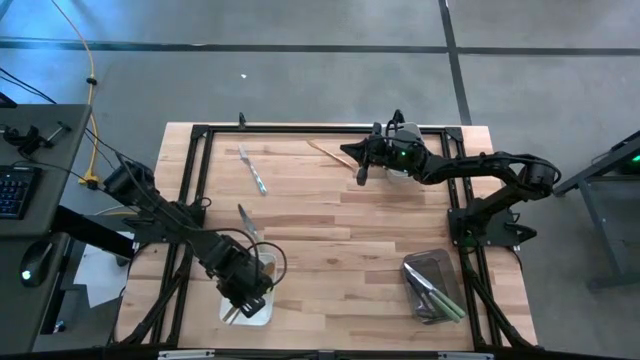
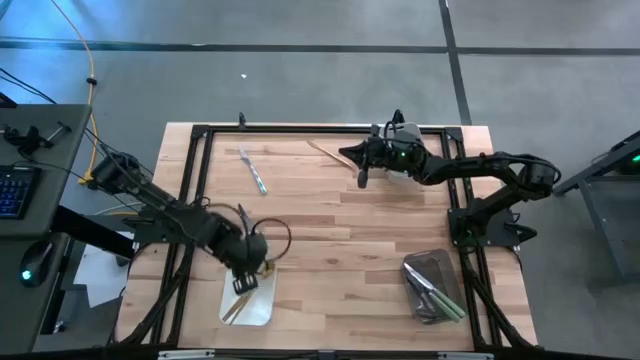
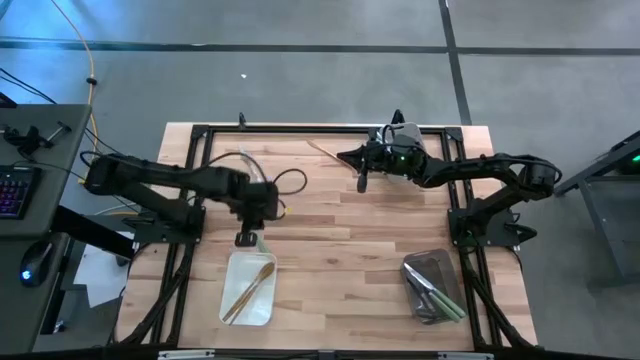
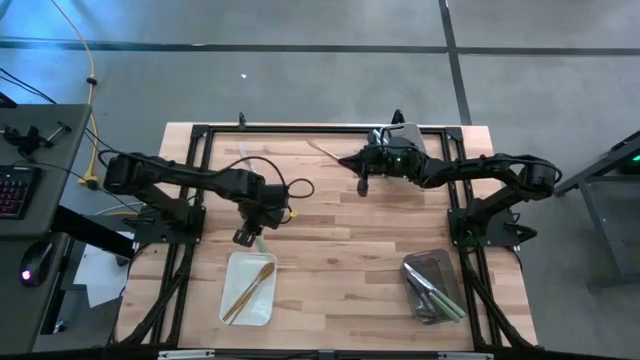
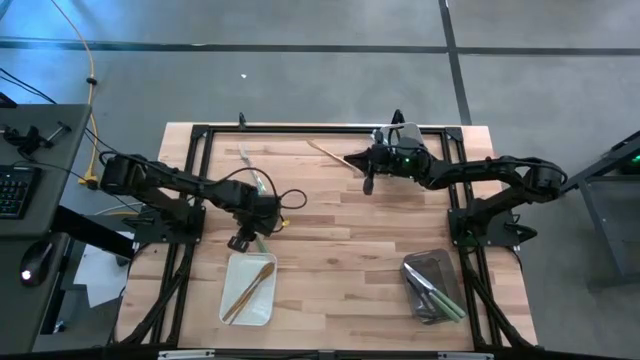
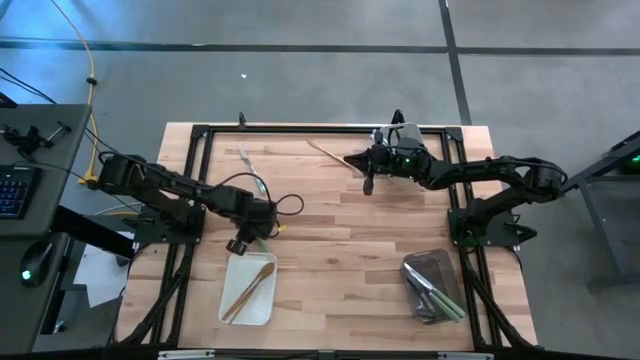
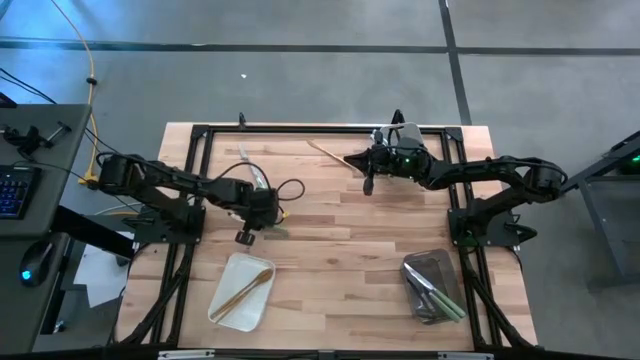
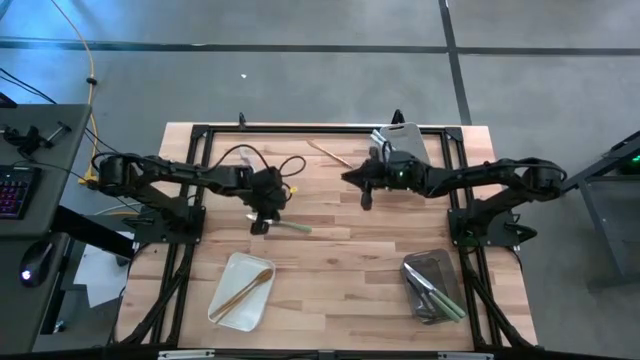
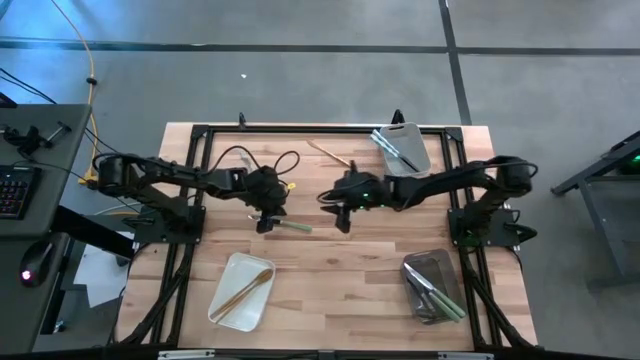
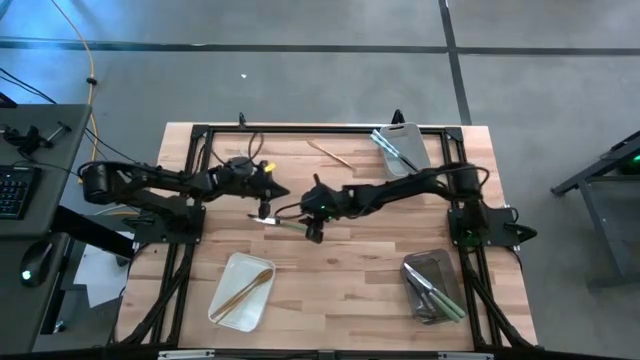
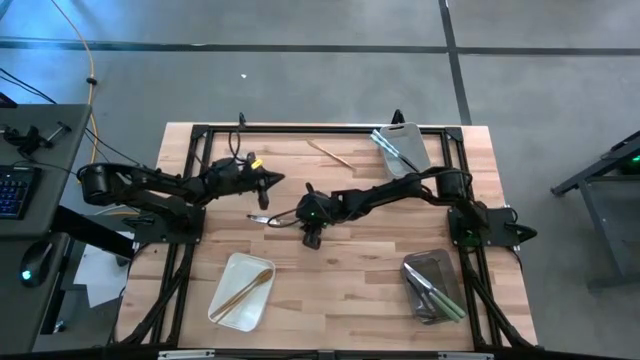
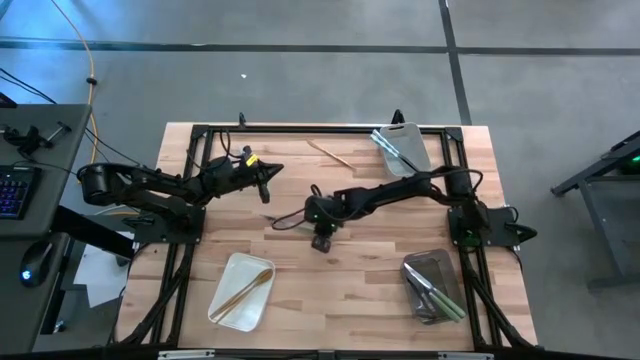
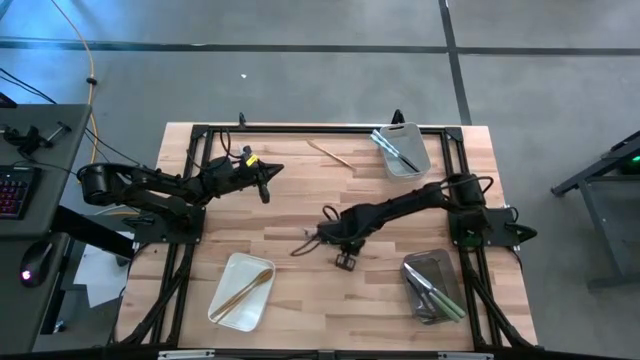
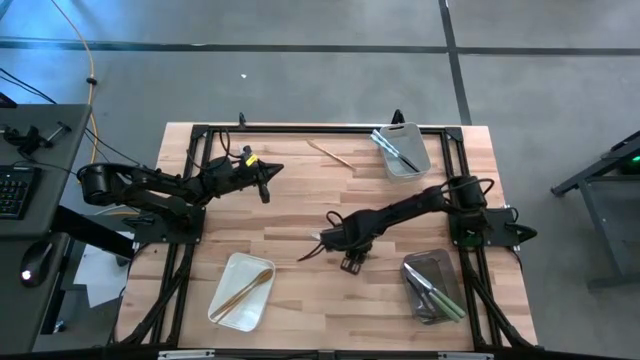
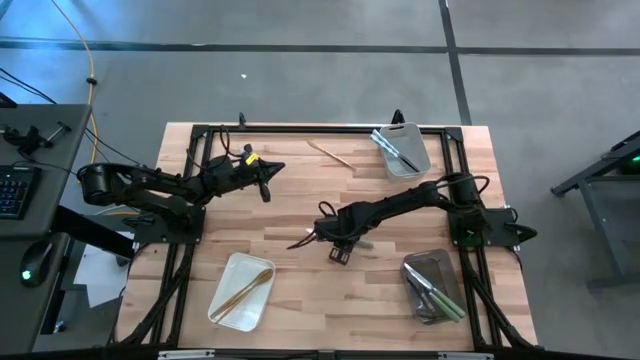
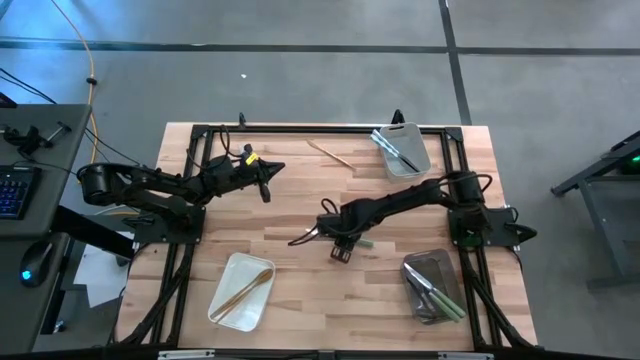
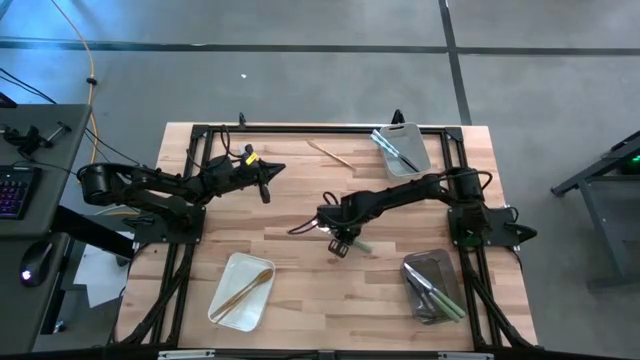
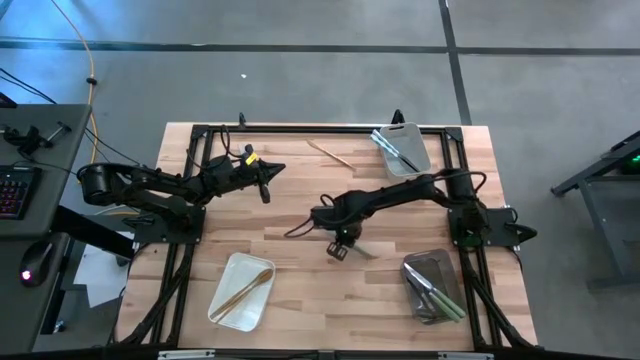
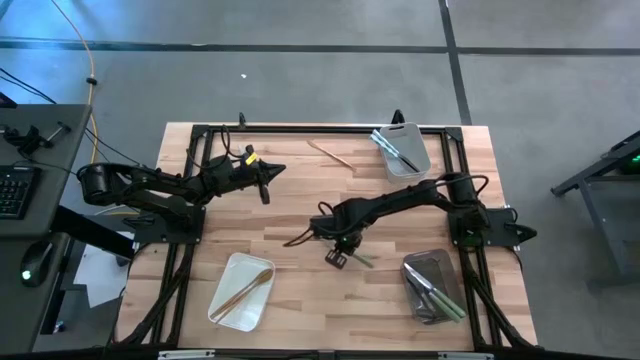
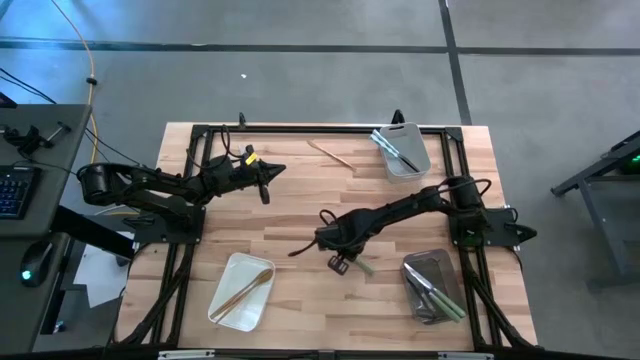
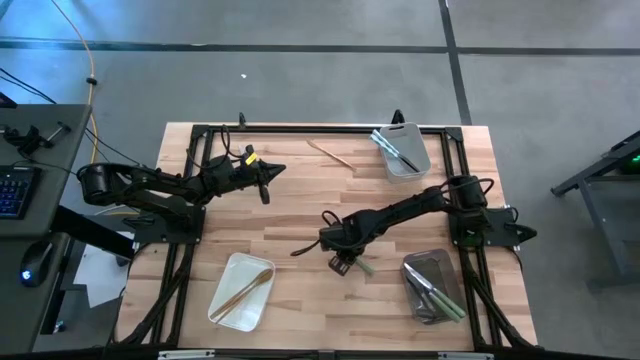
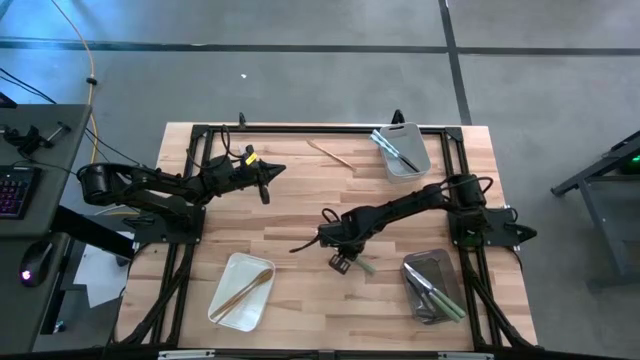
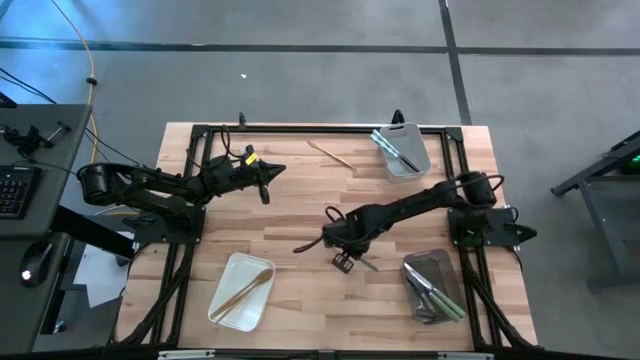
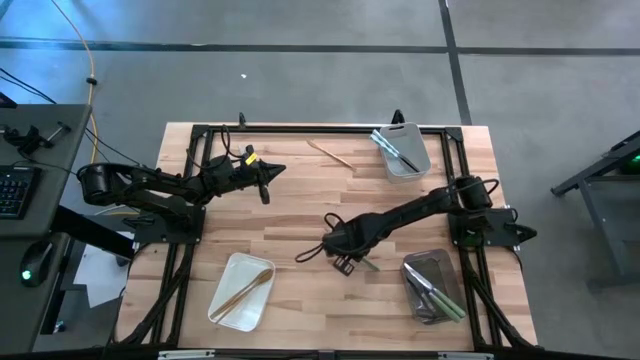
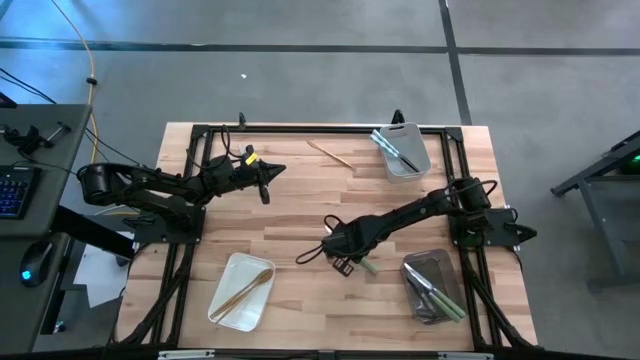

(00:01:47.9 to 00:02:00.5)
Task: Sort silverware by color (type)
Put the green table knife into the black bin

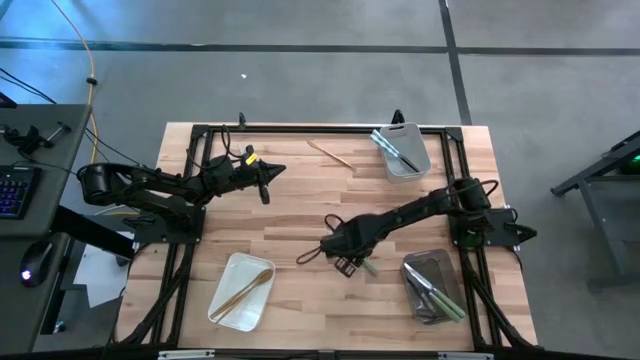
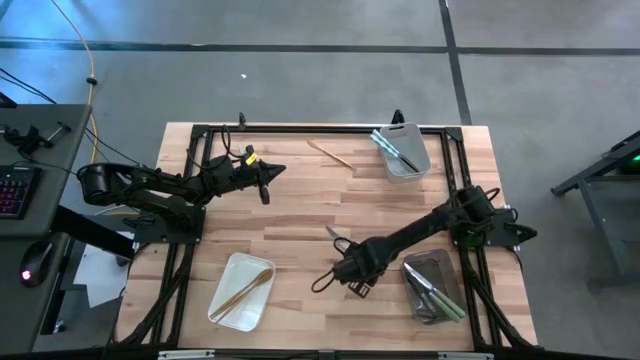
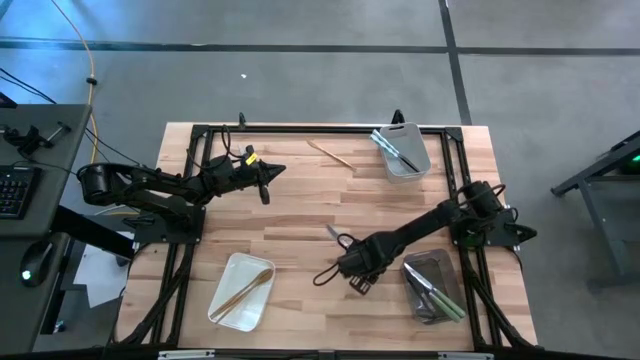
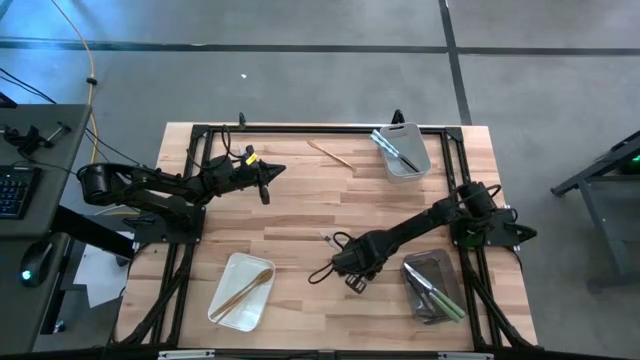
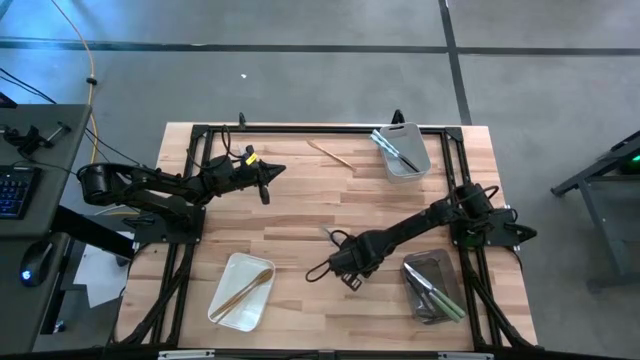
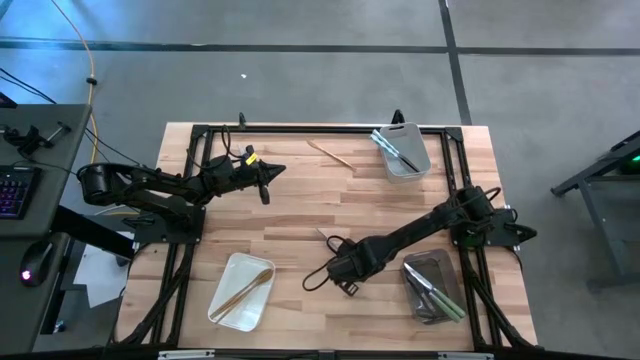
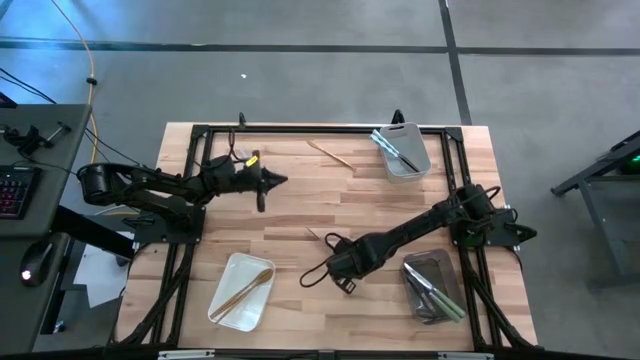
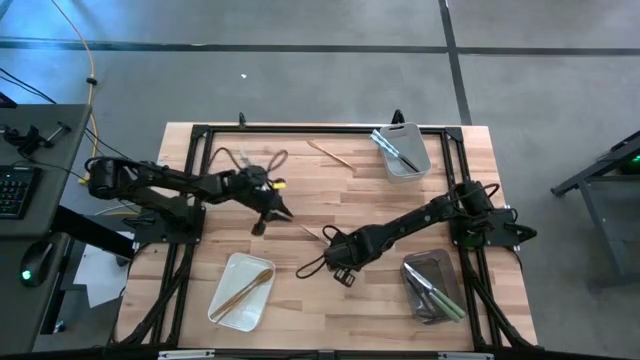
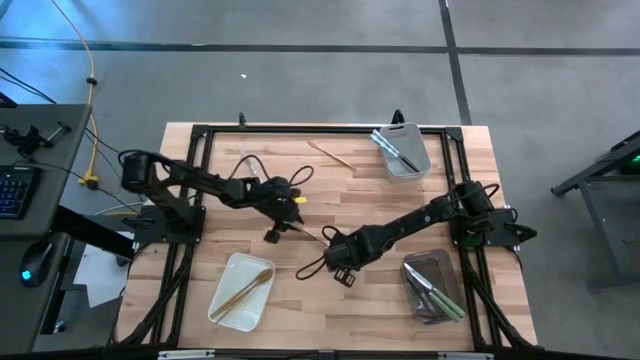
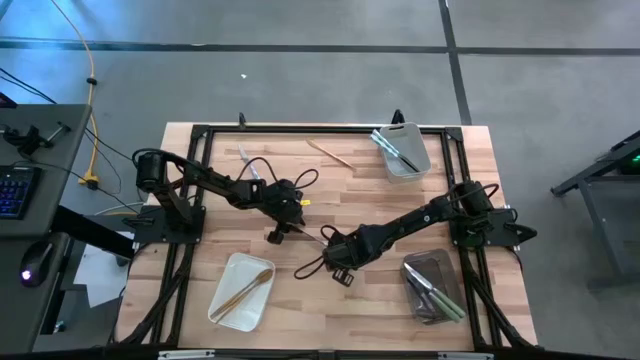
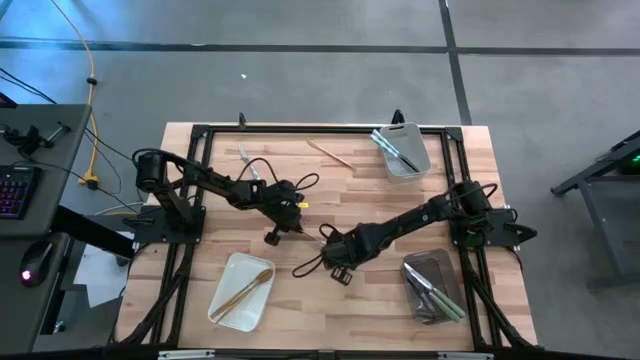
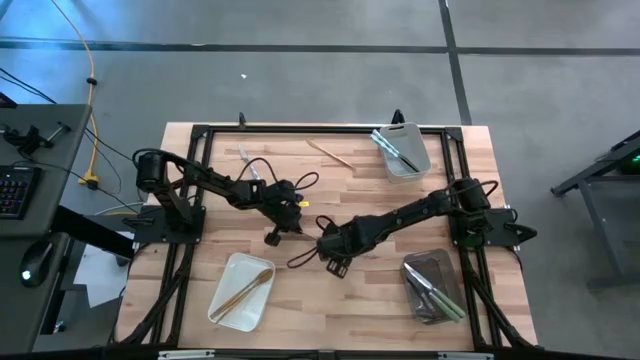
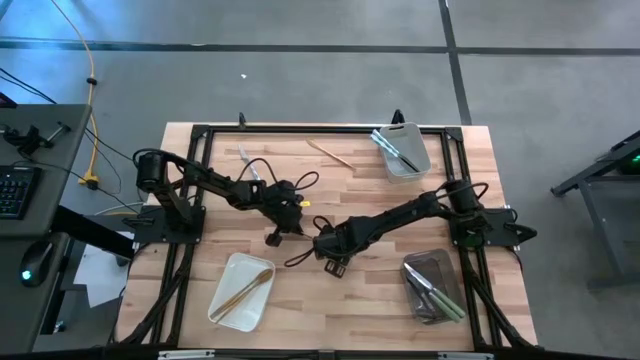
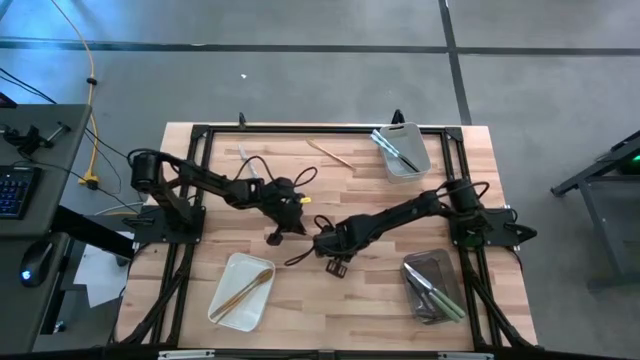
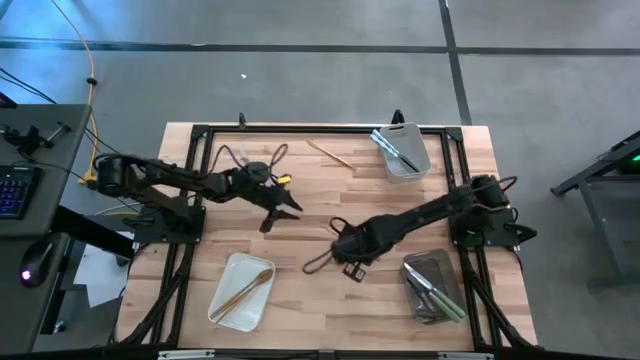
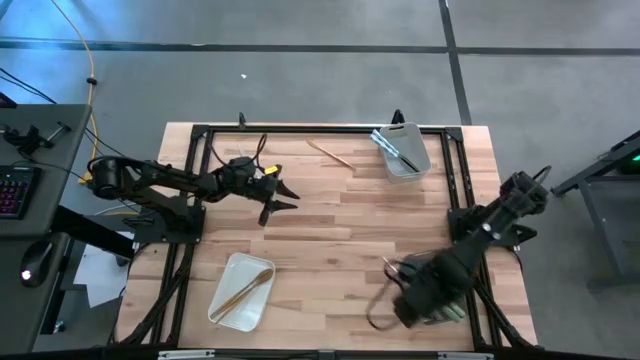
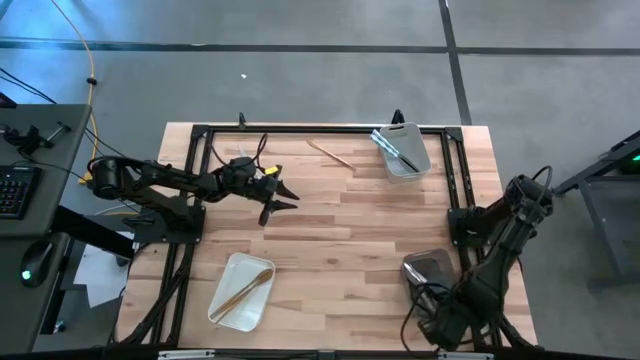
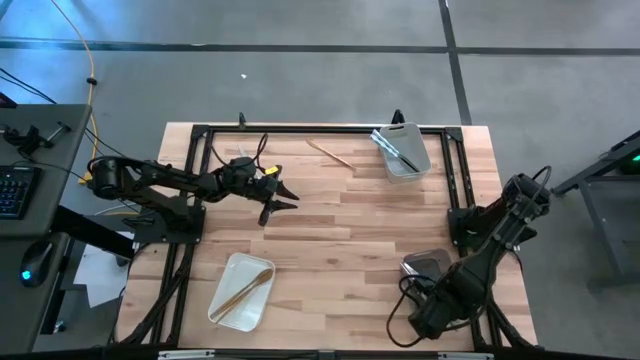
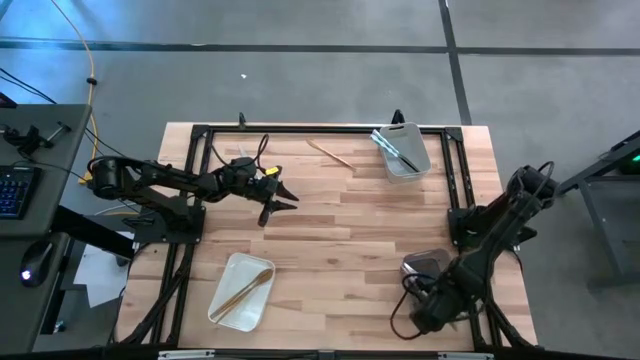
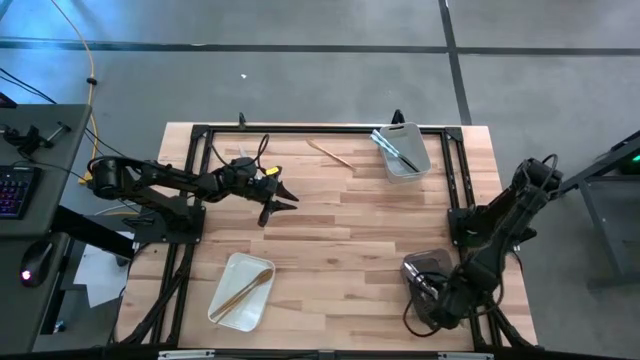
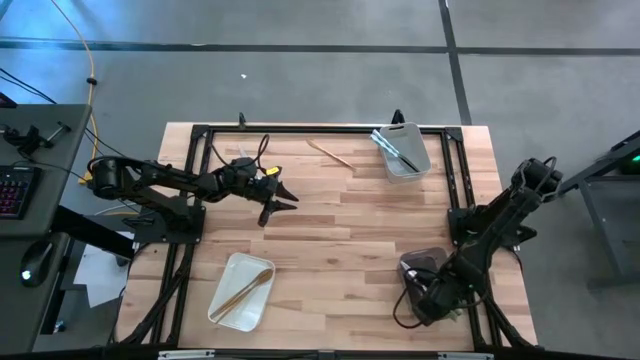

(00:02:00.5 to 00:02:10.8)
Put the green table knife into the black bin
